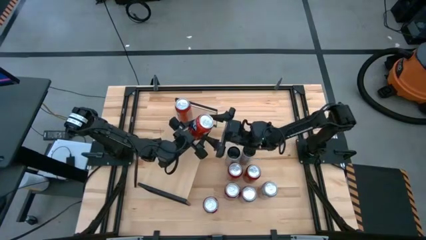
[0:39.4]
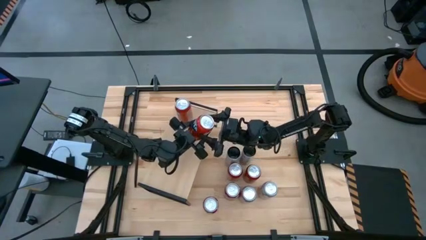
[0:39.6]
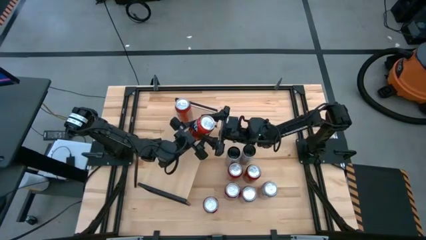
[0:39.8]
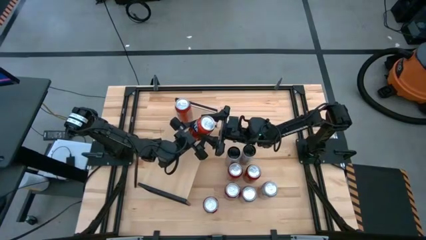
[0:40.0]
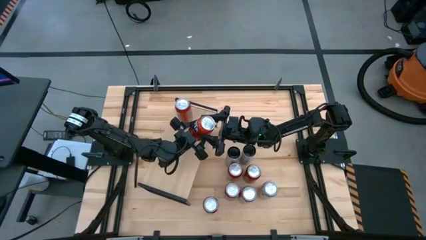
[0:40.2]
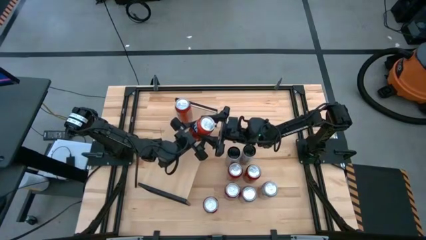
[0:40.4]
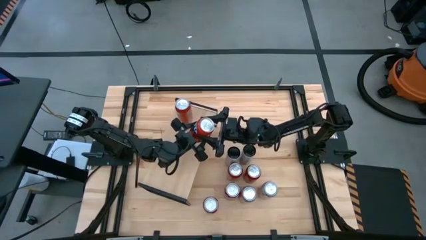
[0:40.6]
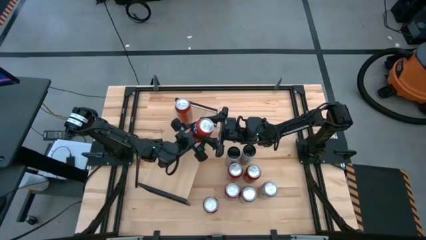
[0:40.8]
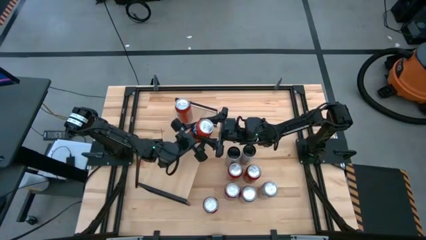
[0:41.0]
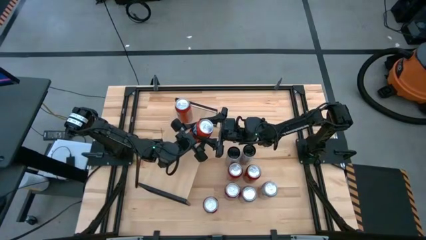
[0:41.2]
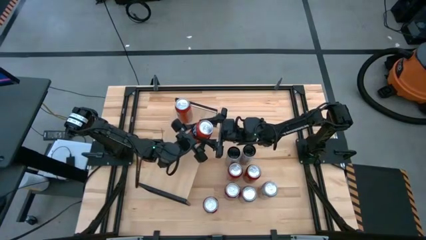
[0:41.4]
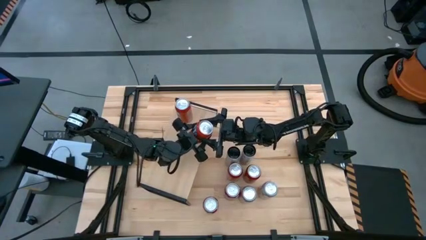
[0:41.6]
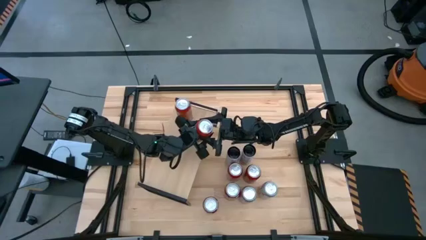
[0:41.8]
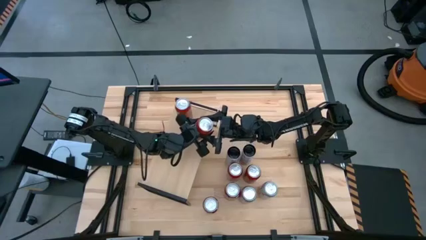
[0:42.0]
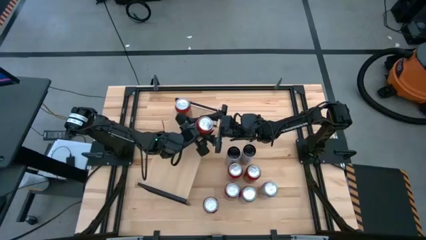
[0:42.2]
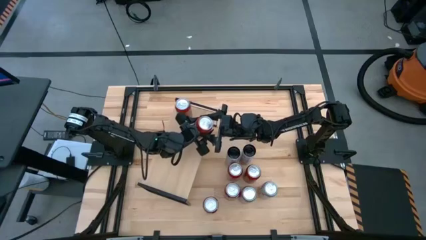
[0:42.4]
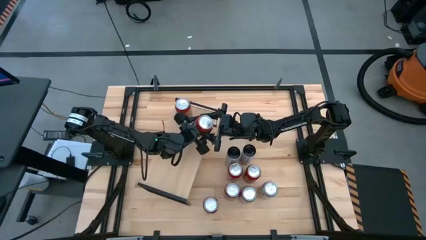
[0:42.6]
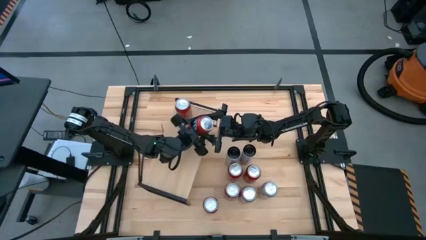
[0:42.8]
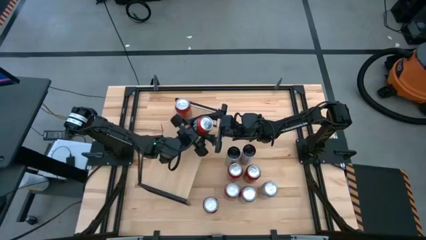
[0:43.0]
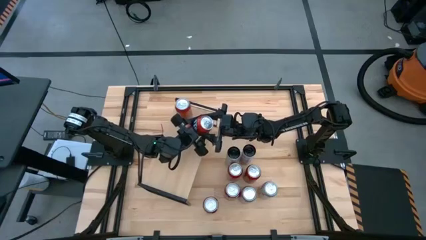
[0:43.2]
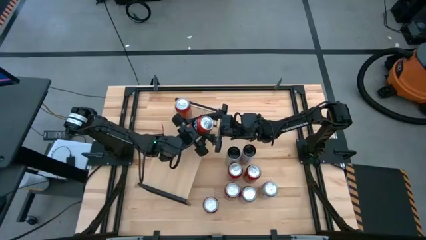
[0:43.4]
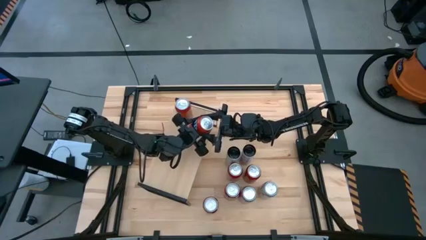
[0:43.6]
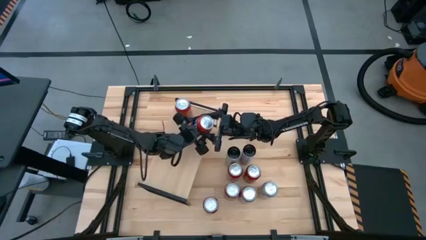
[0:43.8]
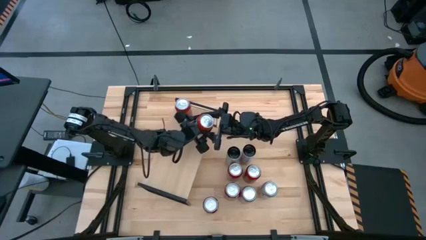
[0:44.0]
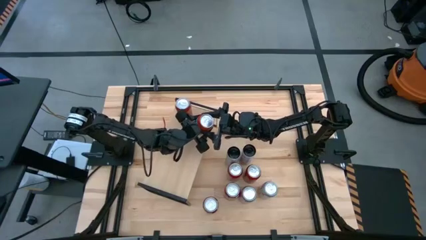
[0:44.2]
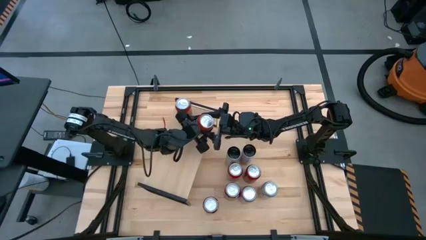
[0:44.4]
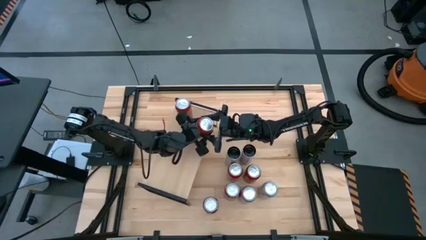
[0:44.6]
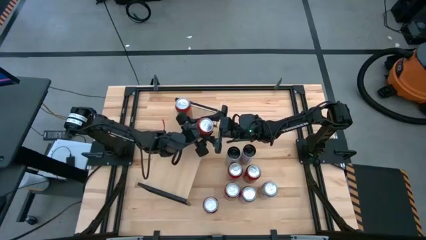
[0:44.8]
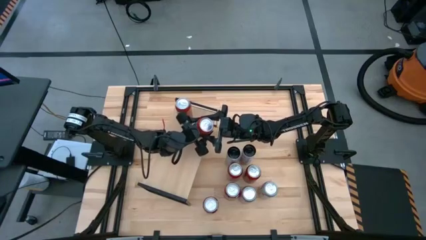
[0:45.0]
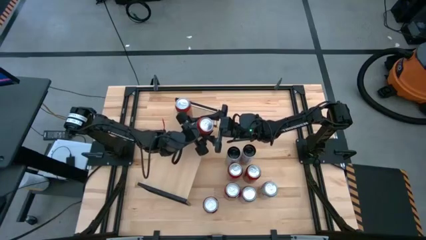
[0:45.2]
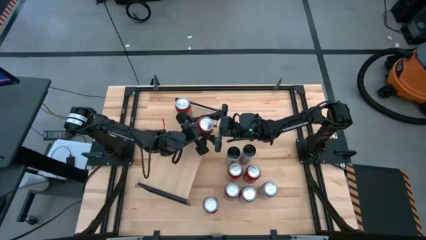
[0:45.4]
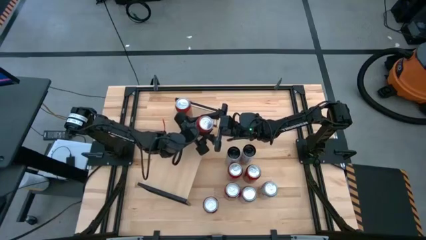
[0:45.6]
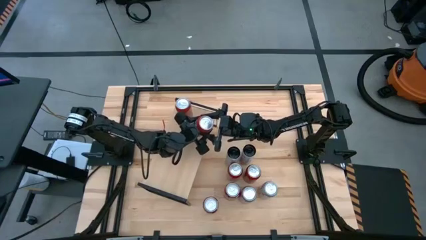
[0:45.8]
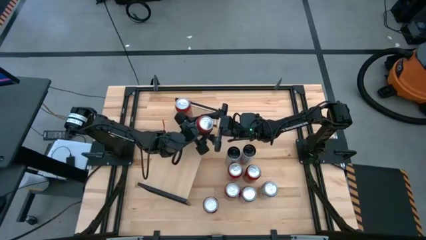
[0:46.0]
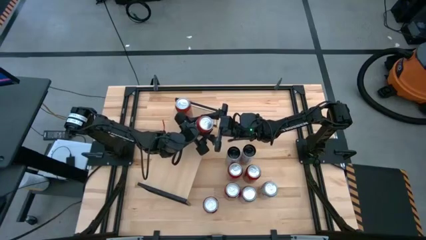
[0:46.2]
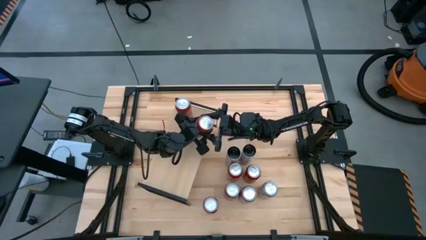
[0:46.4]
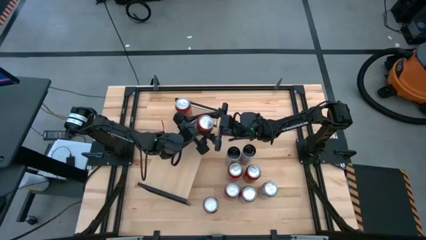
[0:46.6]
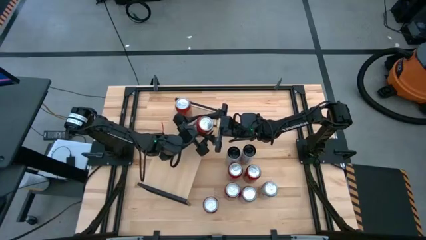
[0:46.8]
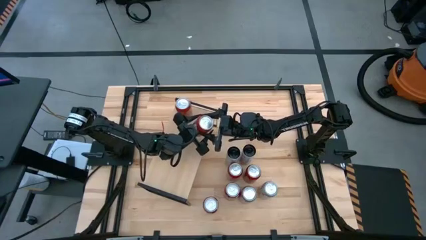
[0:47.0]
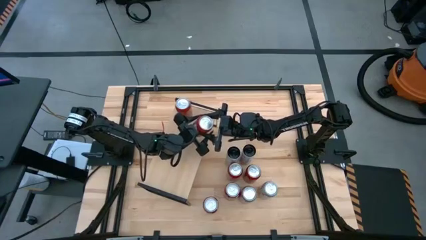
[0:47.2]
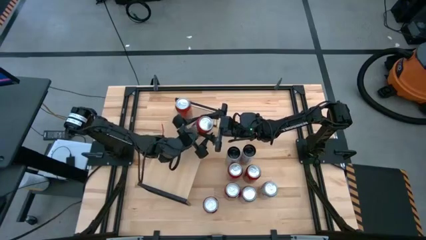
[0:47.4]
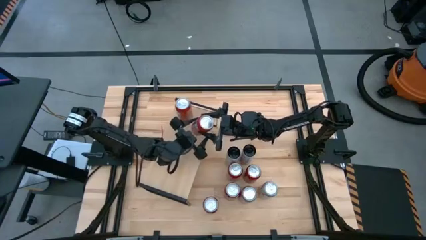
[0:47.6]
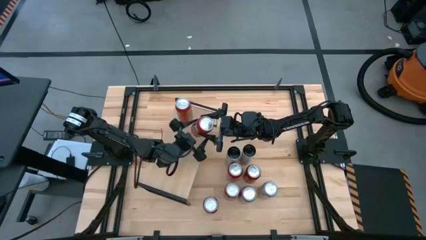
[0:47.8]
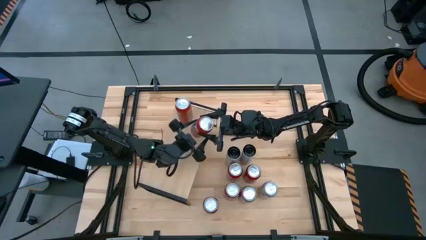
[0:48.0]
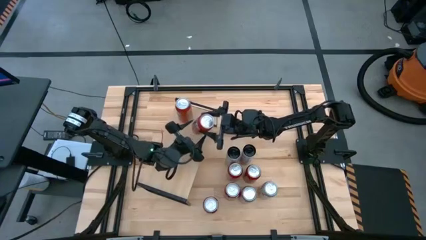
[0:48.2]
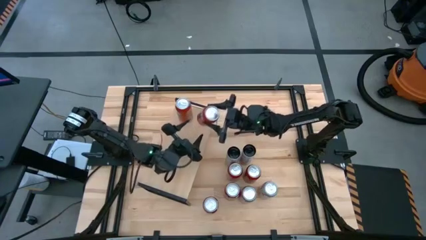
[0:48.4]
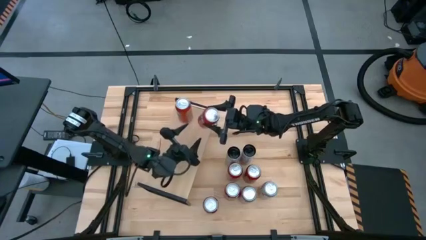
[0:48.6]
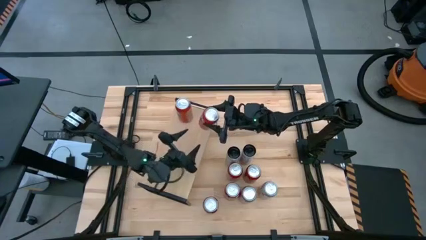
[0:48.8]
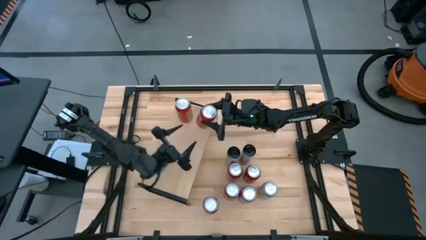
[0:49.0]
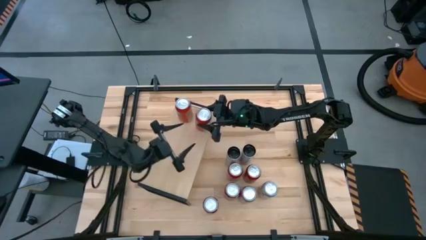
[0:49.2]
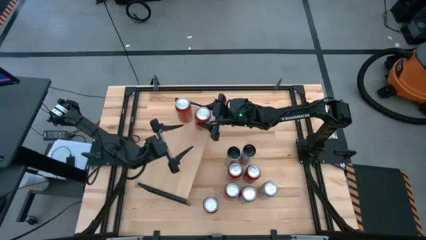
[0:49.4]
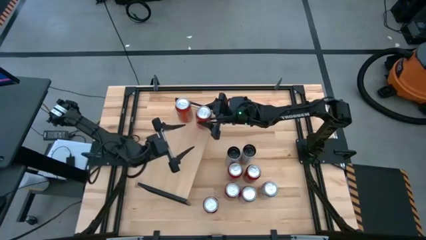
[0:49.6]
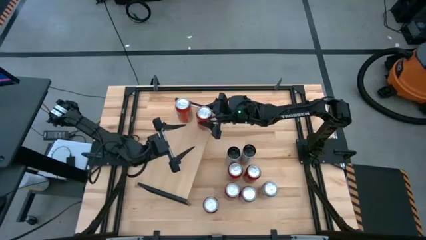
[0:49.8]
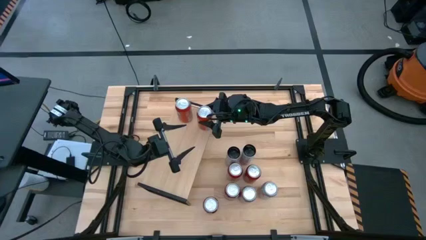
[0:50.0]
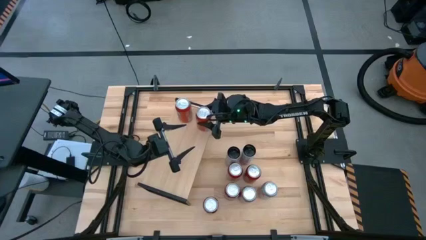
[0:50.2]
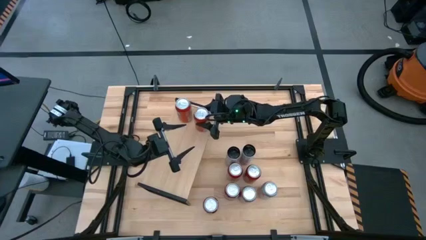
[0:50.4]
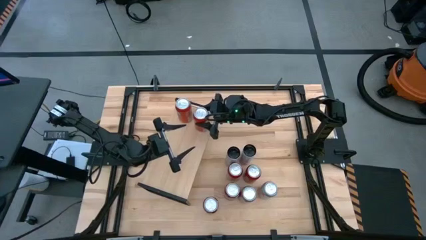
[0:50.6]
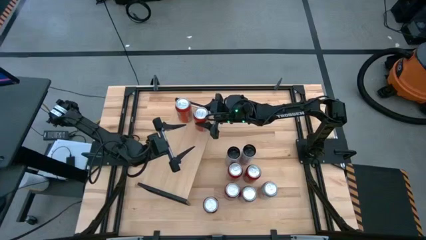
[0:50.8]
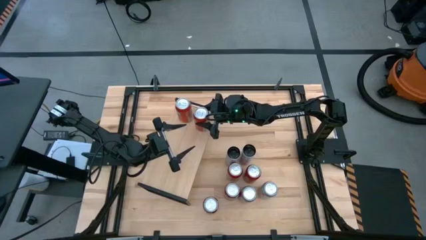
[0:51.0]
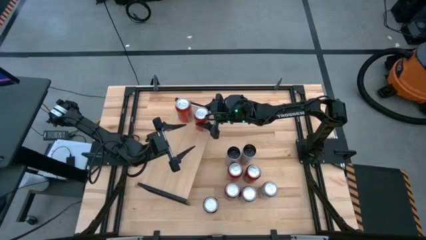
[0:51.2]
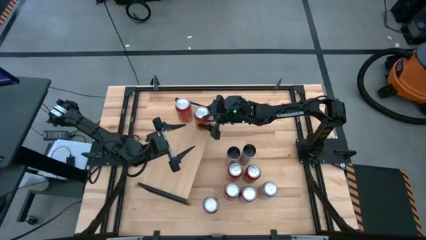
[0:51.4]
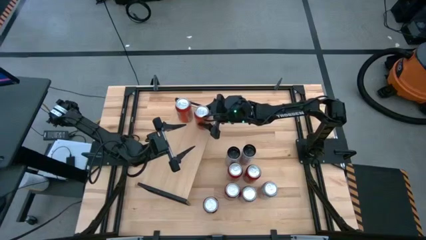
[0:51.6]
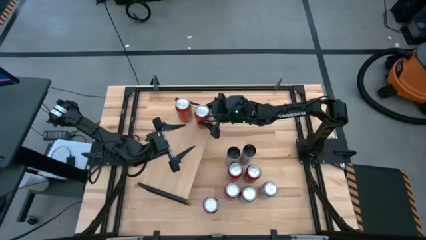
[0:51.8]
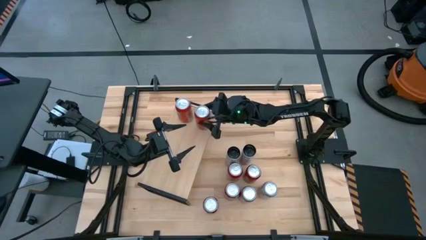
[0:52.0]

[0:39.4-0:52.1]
Task: Place canned beverage on shelf
Put the orange soda can on the shelf

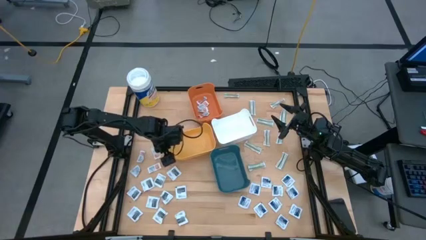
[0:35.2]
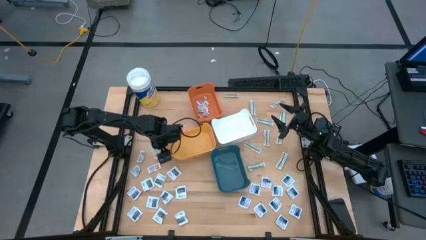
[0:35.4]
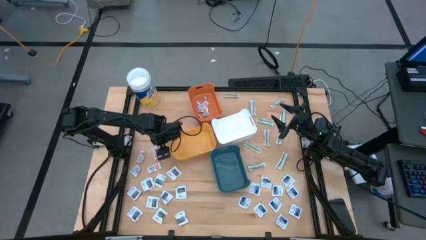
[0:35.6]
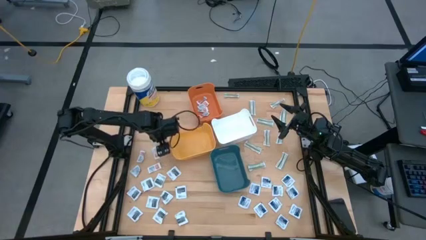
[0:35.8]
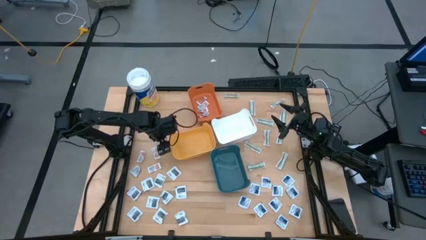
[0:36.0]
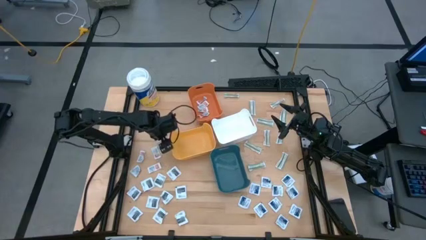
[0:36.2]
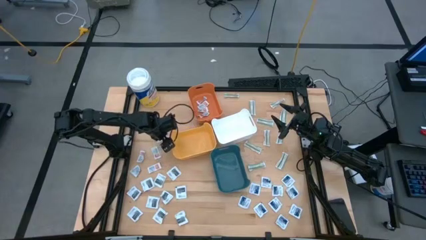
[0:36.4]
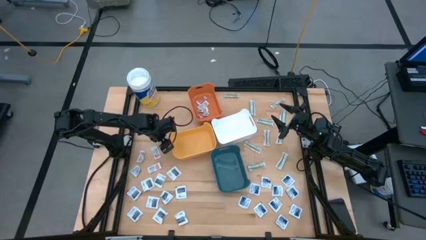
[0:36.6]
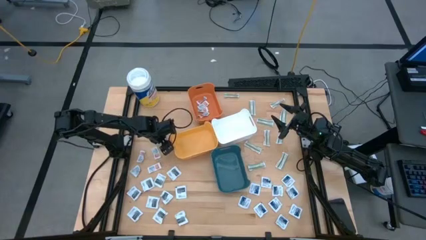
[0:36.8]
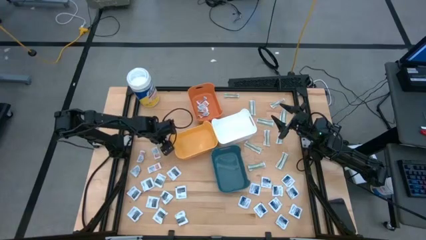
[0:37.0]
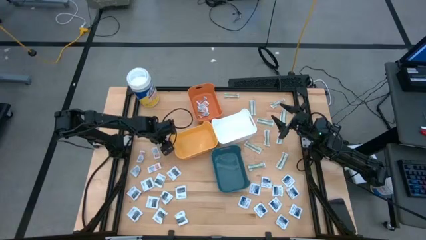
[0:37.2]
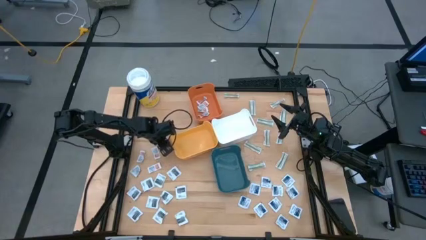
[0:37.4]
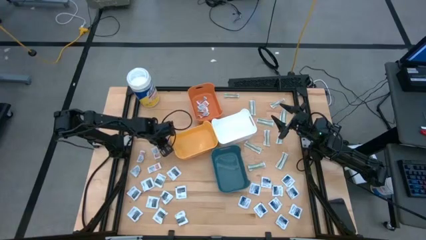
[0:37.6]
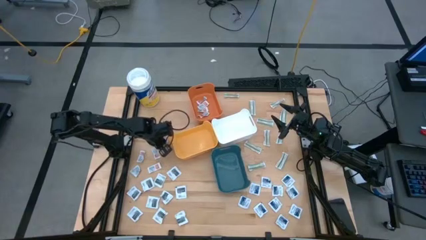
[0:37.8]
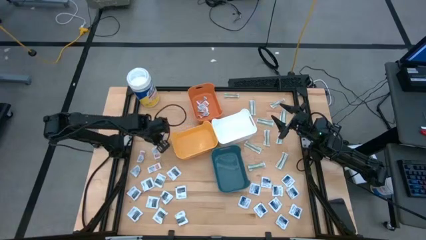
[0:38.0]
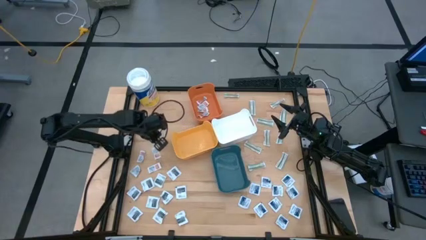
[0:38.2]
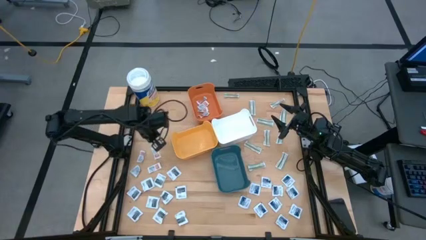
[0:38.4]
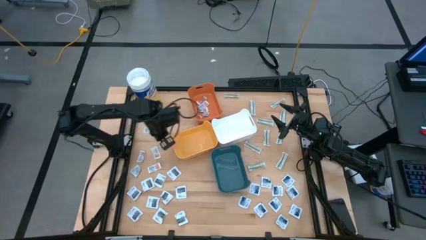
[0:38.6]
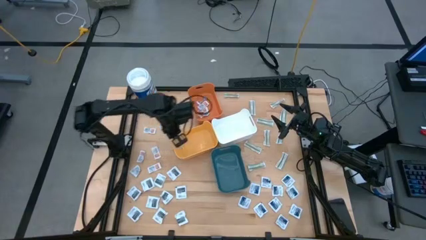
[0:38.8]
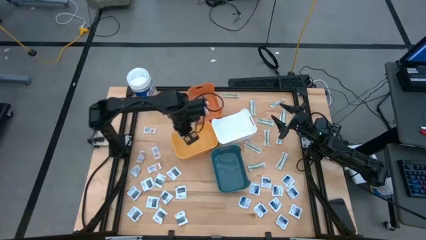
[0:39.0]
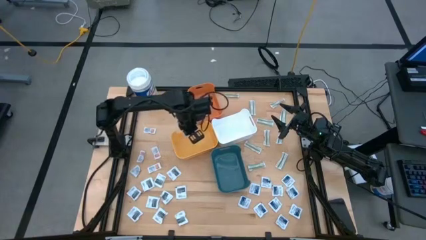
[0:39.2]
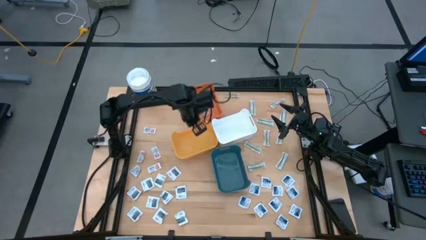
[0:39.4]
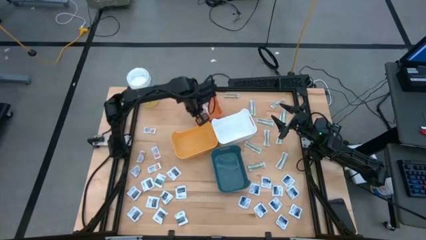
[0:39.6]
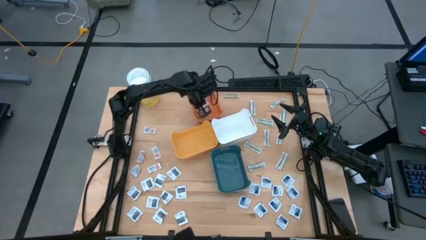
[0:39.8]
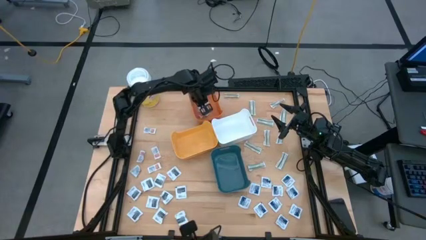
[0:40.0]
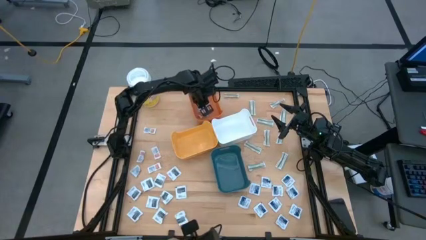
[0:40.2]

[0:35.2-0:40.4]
Task: Pick & Place First Aid Supplies
Put the orange ointment pack into the orange bin
